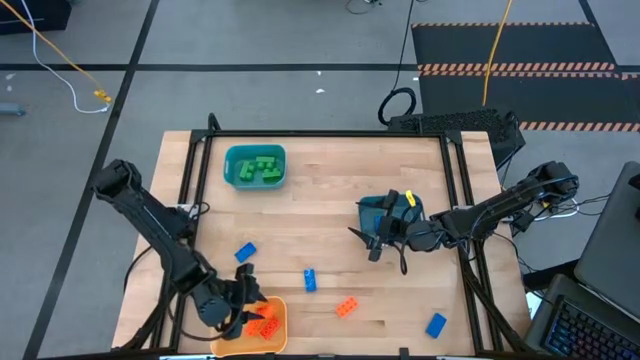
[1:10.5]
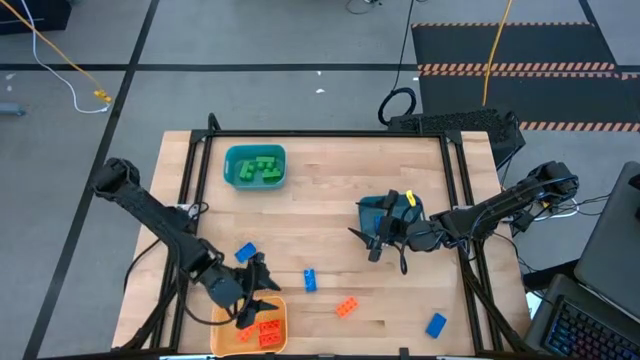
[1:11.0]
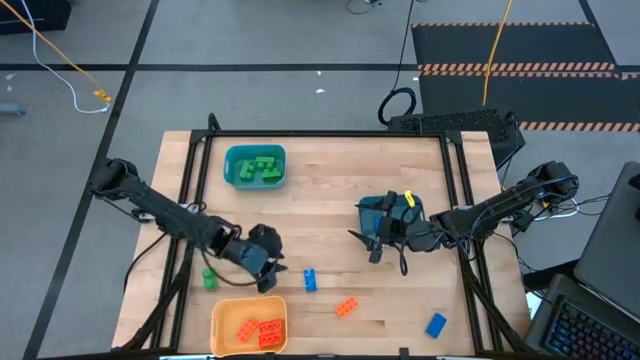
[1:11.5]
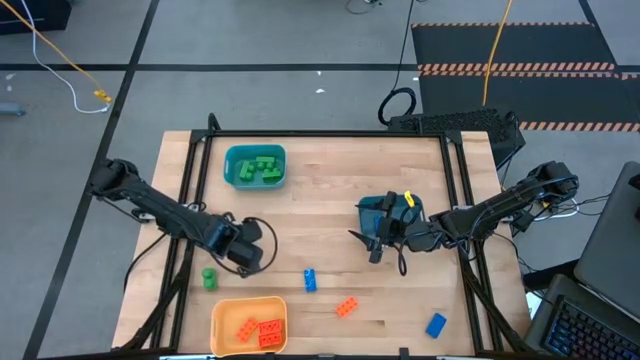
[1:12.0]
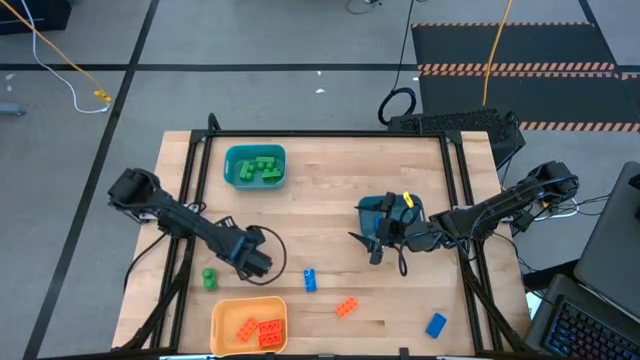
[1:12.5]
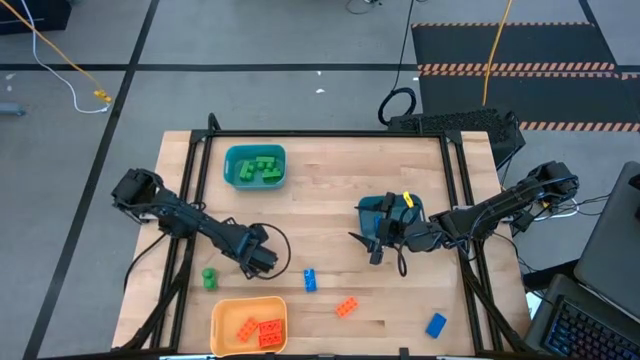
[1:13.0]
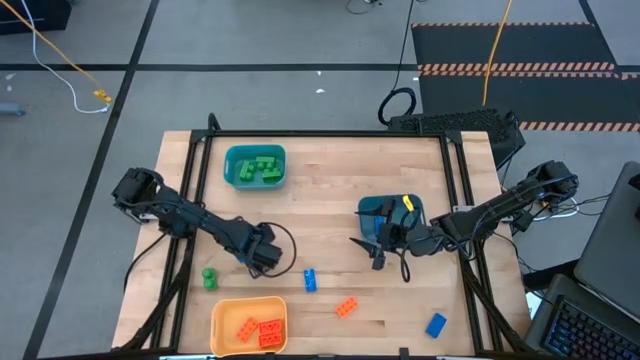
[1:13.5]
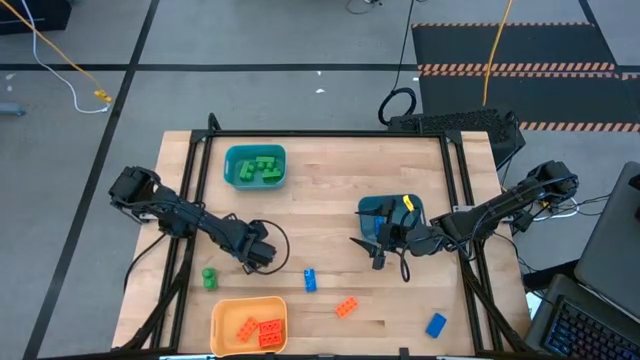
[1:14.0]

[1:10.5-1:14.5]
Task: Sort & place blocks by color
Put the blue game piece into the dark blue bin

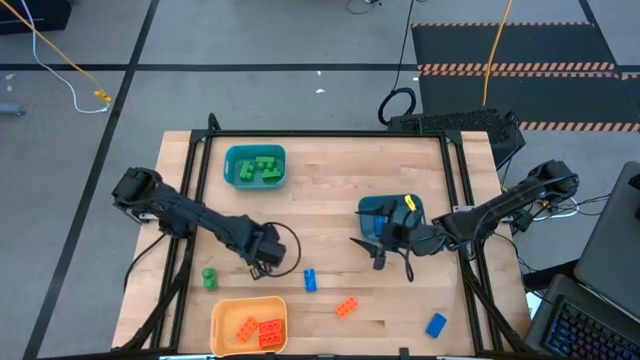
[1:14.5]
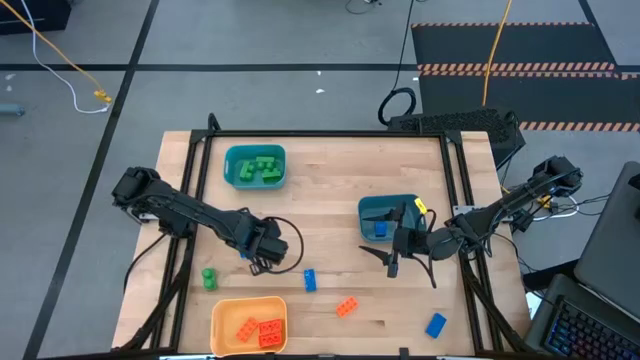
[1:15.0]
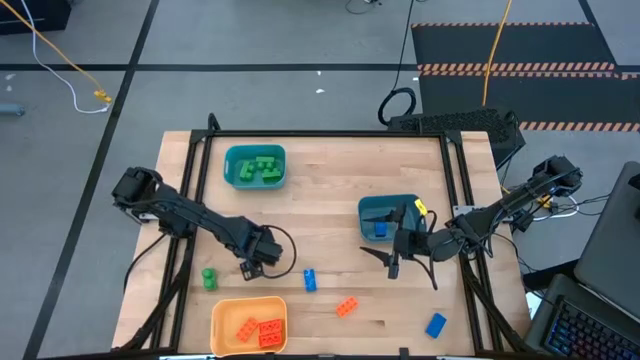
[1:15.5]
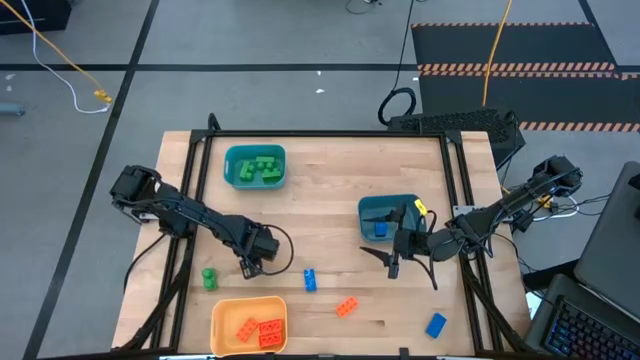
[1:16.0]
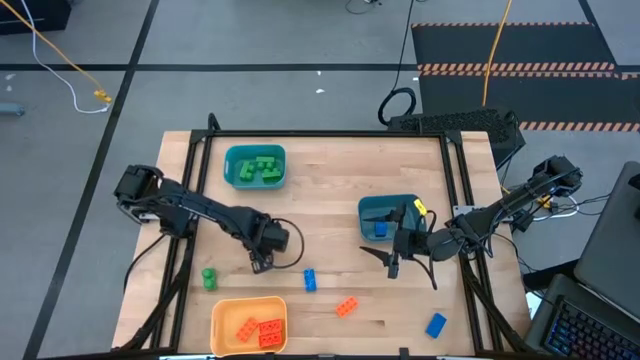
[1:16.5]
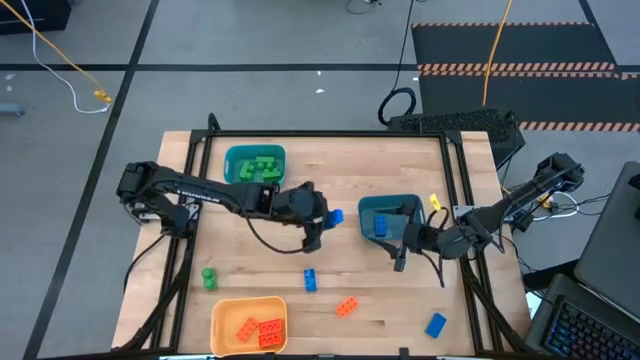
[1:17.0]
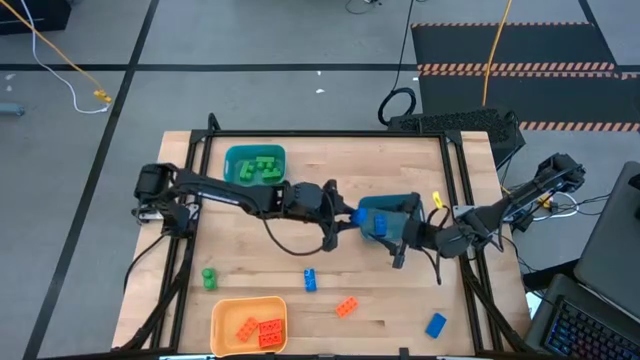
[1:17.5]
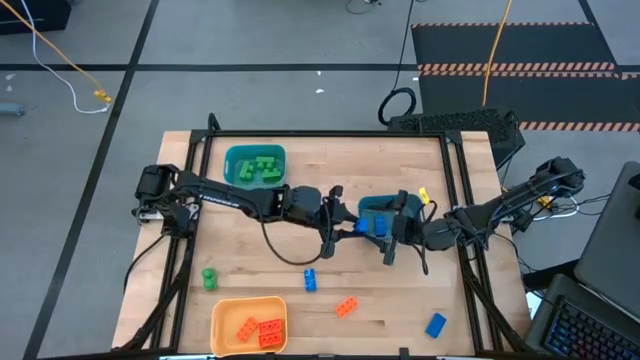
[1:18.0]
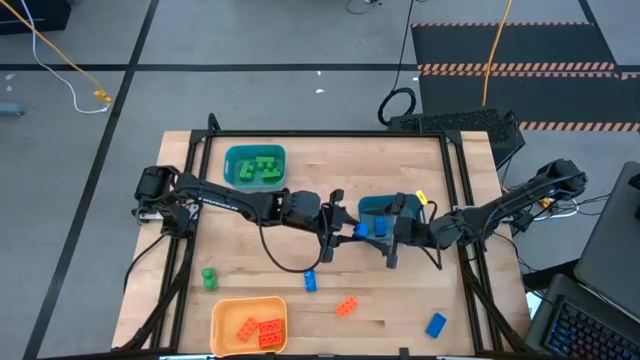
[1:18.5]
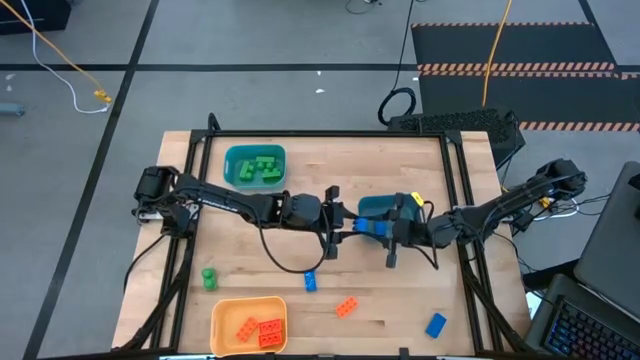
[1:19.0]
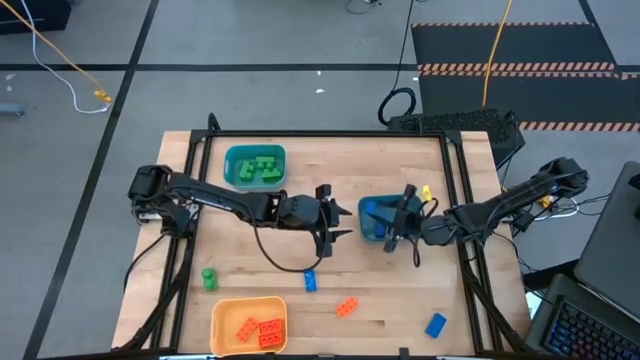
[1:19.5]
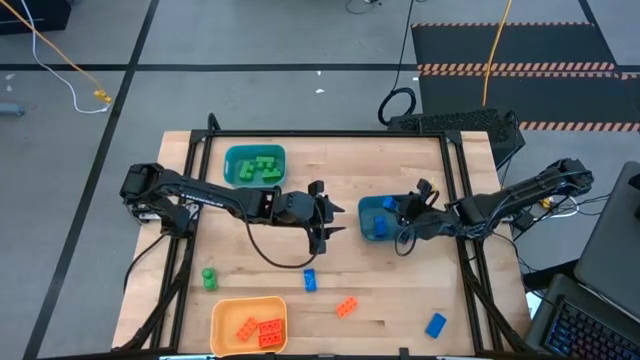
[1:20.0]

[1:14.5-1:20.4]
Put the blue game piece into the dark blue bin

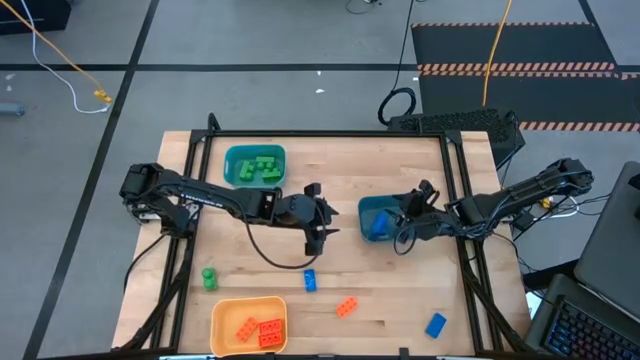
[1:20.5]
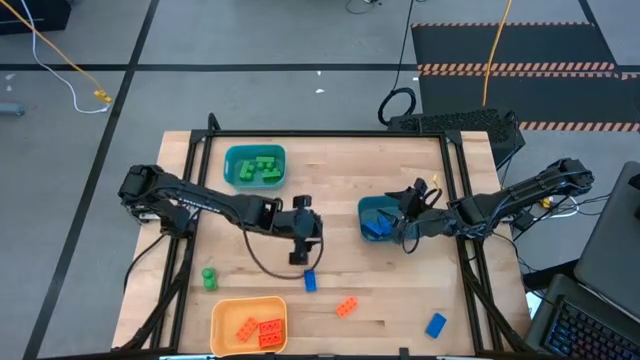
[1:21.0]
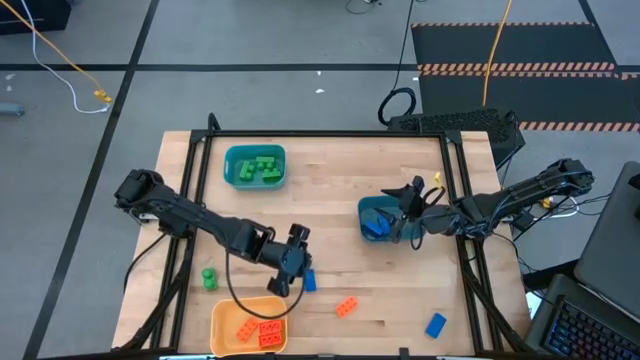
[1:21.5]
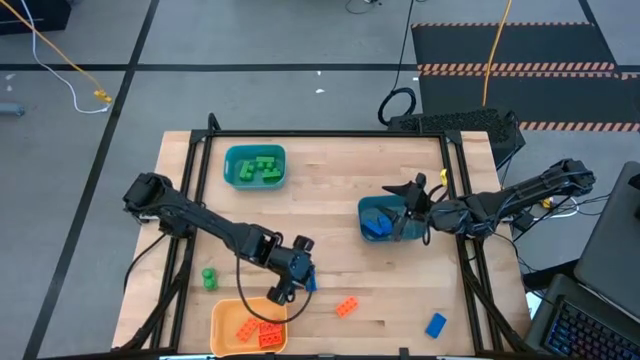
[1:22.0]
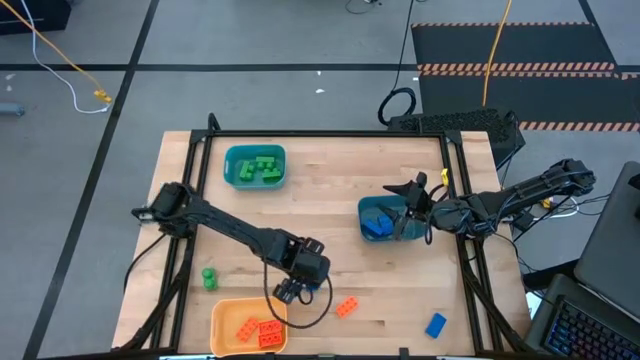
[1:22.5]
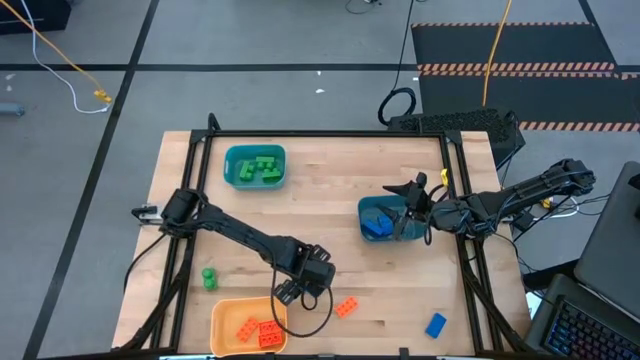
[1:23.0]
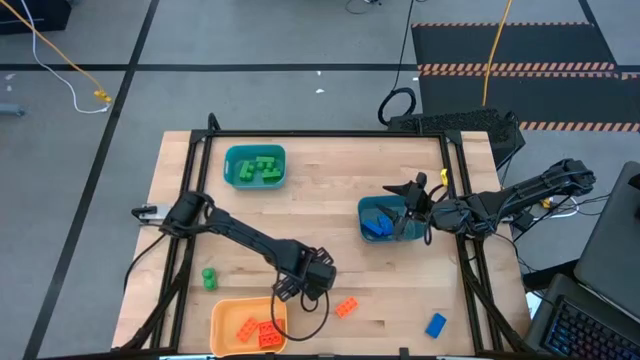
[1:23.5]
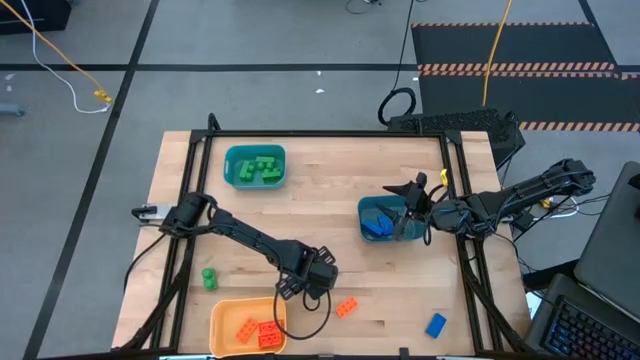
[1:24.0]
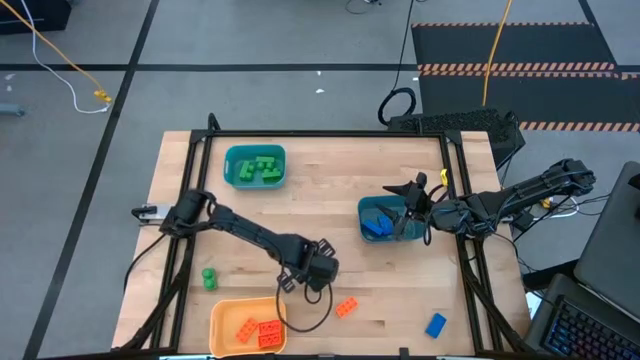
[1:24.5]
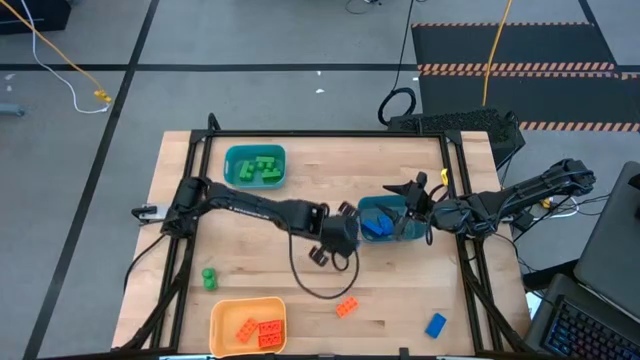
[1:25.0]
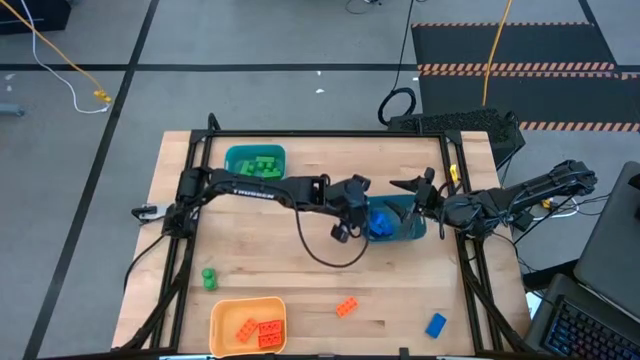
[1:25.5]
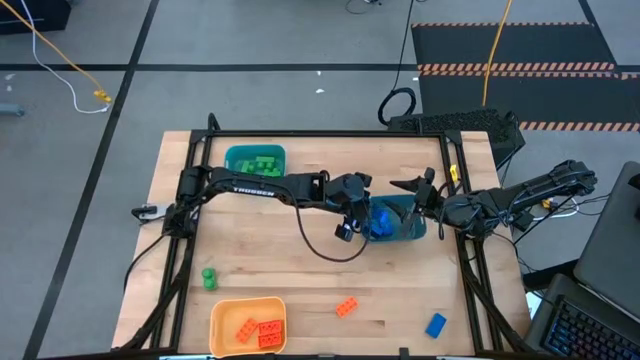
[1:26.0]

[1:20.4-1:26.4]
Put the blue game piece into the dark blue bin

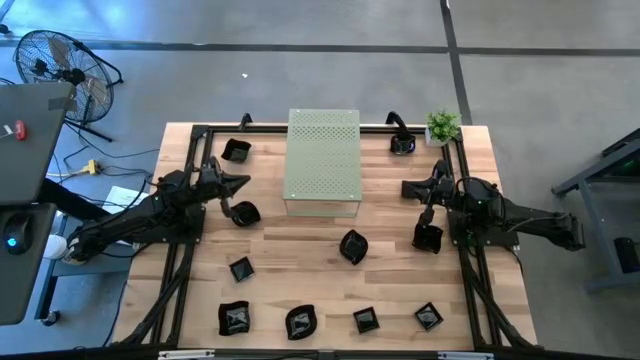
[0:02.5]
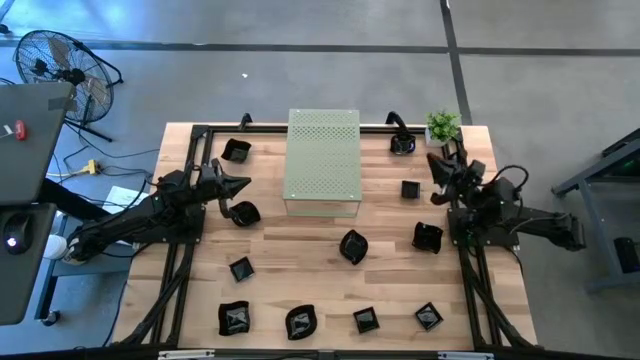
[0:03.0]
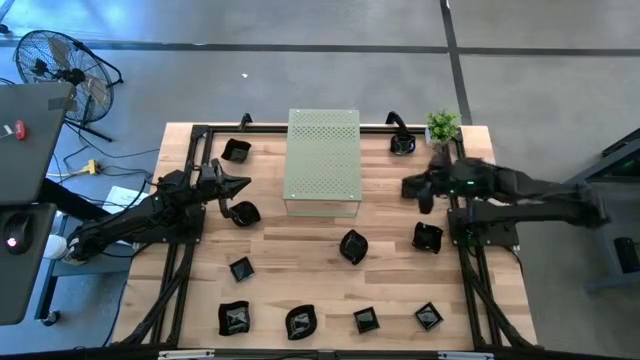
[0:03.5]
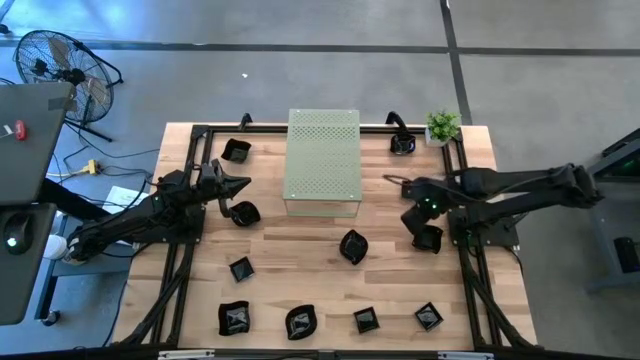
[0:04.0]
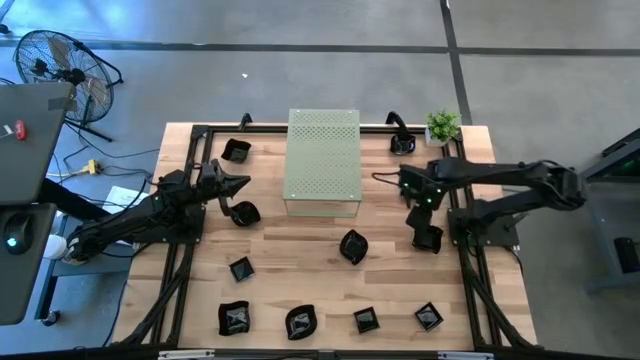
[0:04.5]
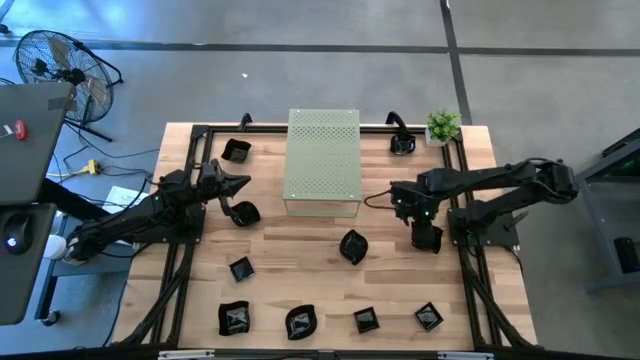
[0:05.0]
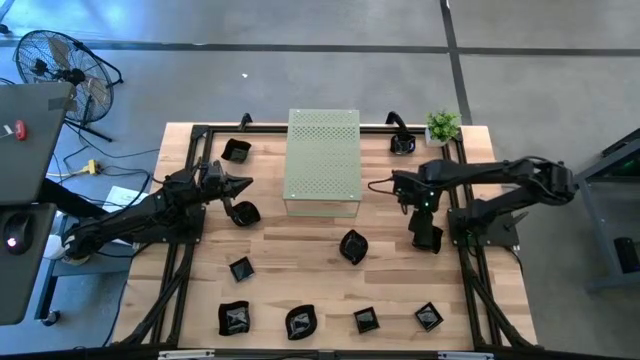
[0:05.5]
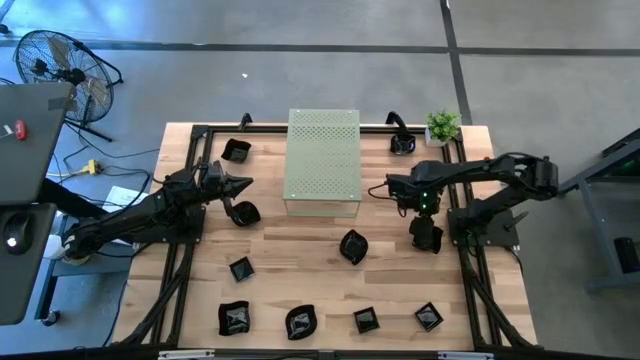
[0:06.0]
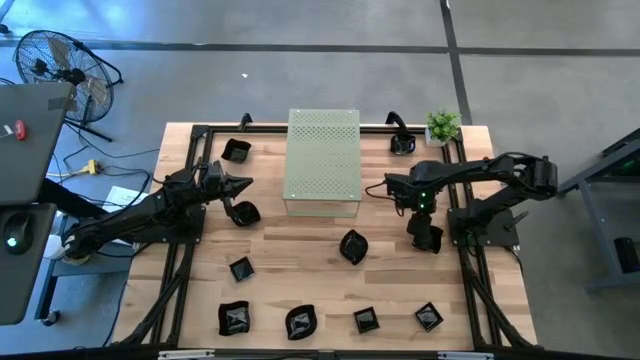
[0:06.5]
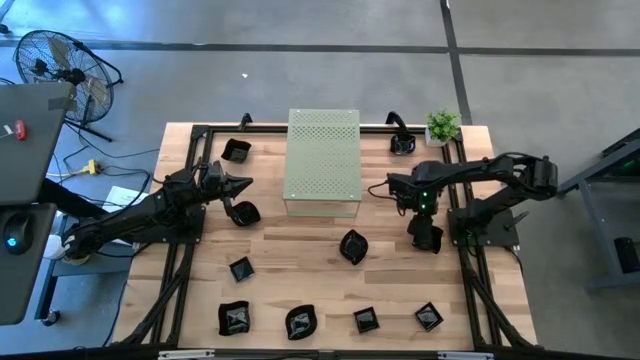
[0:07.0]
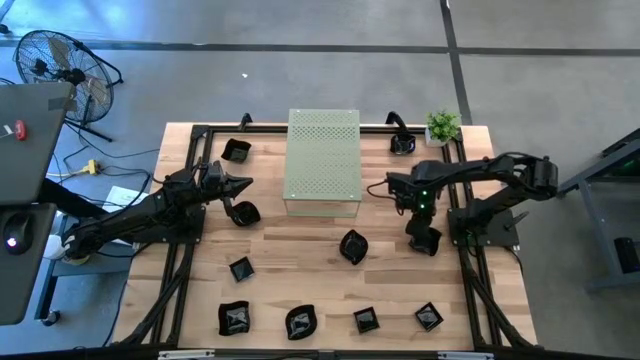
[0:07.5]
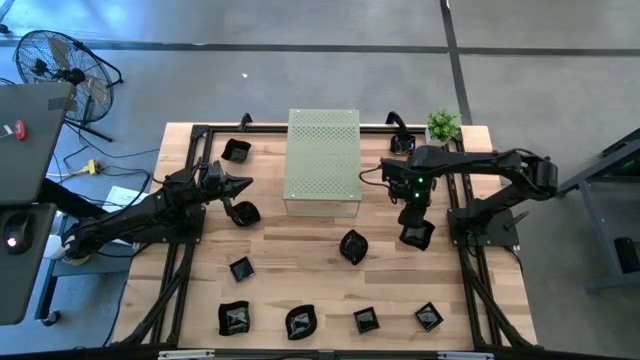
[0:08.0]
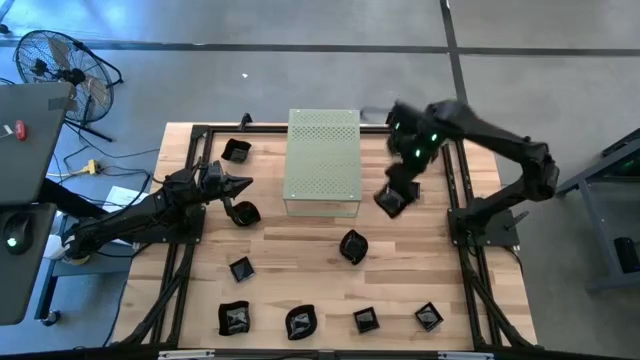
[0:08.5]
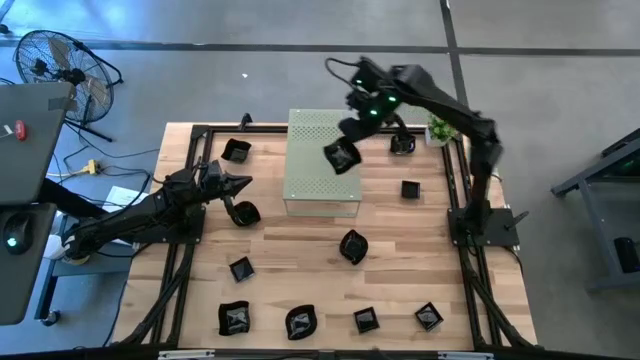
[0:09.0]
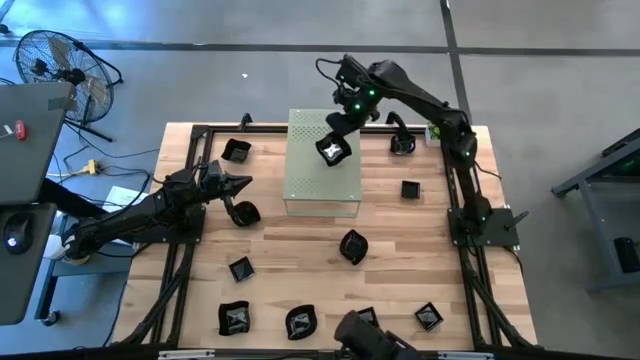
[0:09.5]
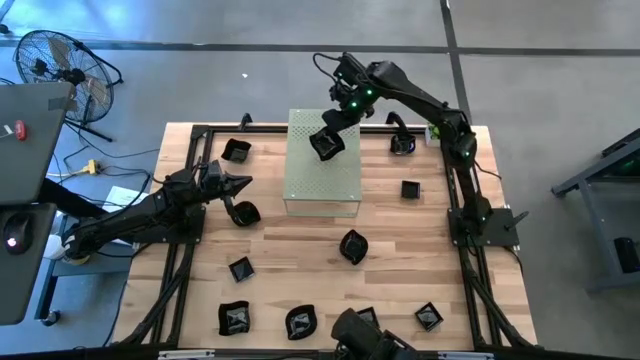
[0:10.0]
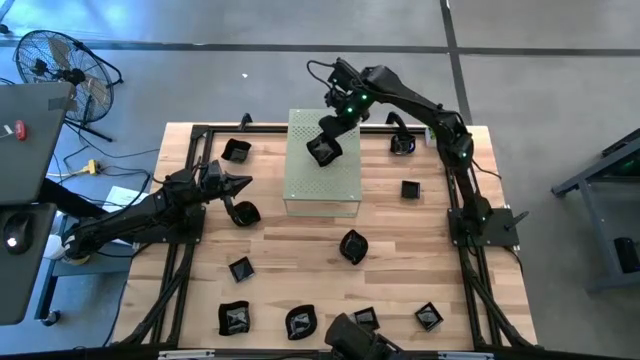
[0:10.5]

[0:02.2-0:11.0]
Task: Pick & Place Mini shaped plates
Put the middle black distorted square plate on the shelf
